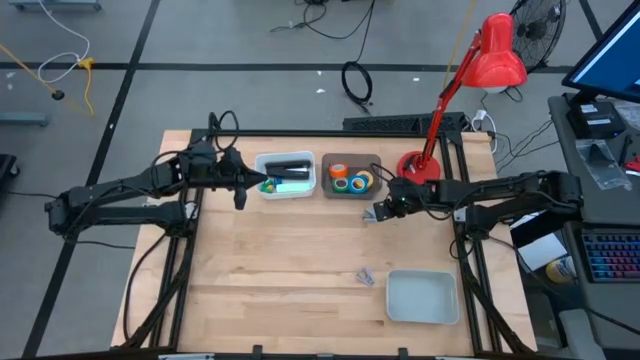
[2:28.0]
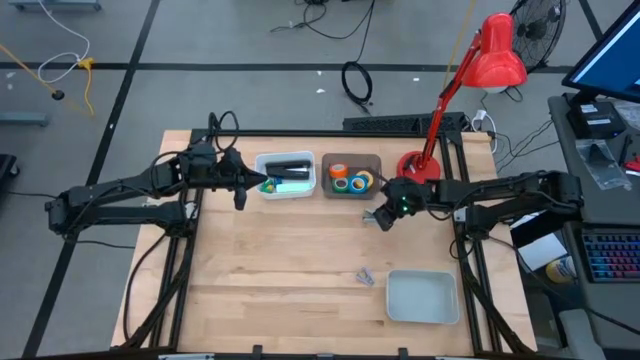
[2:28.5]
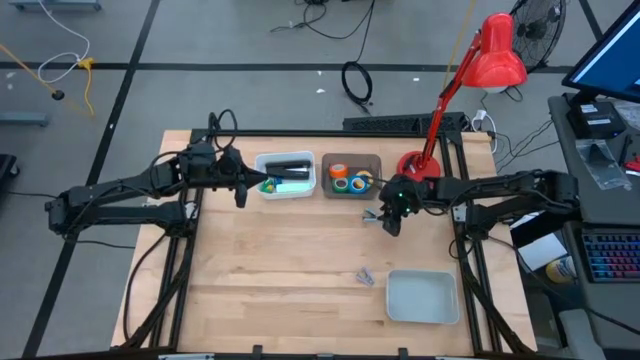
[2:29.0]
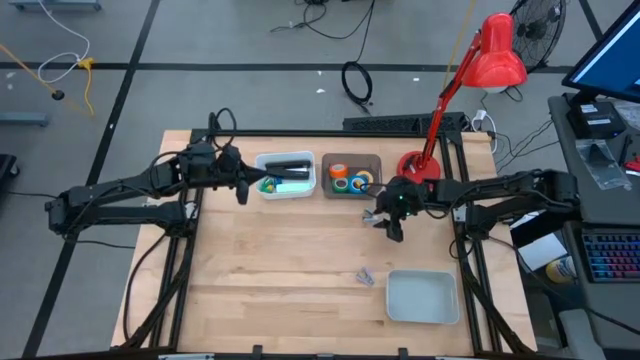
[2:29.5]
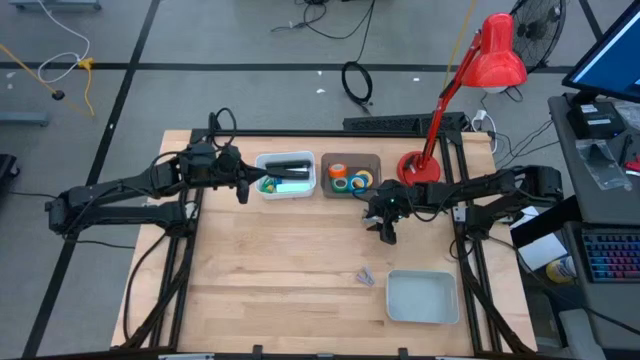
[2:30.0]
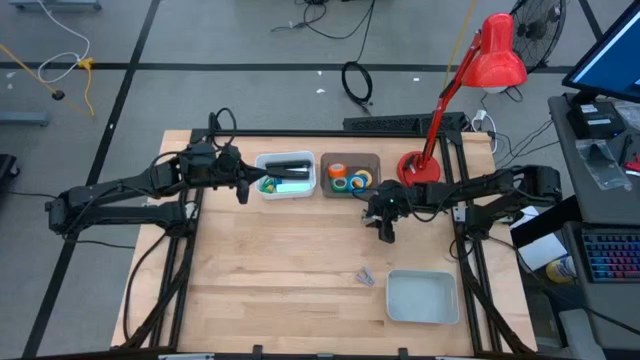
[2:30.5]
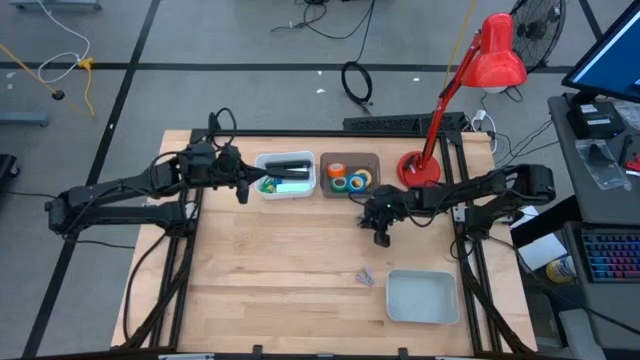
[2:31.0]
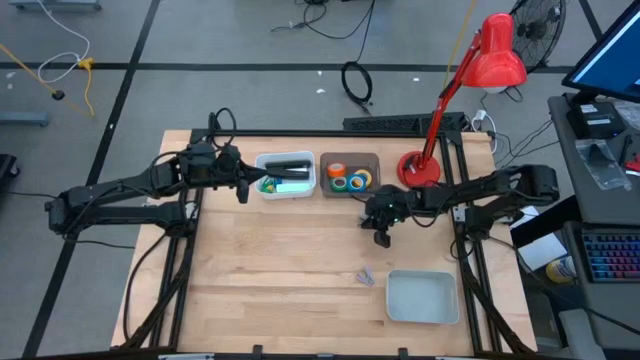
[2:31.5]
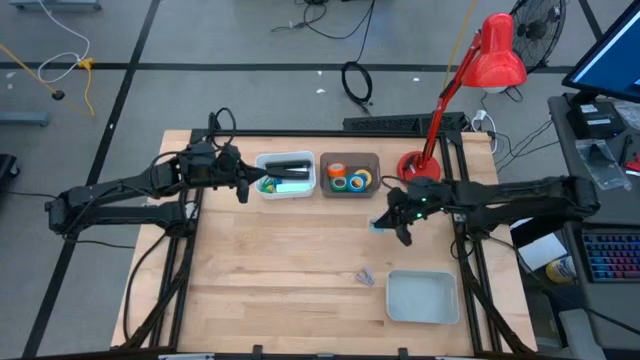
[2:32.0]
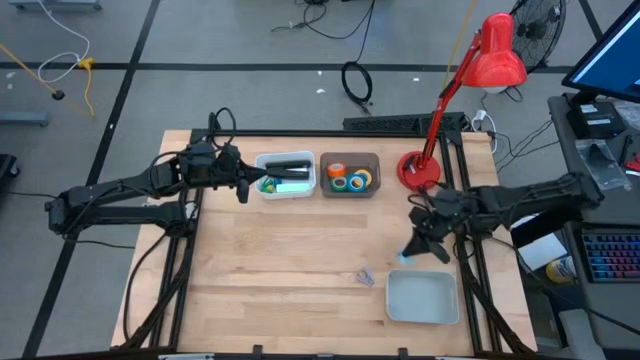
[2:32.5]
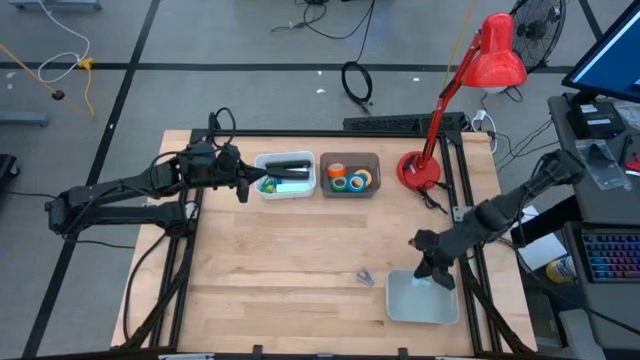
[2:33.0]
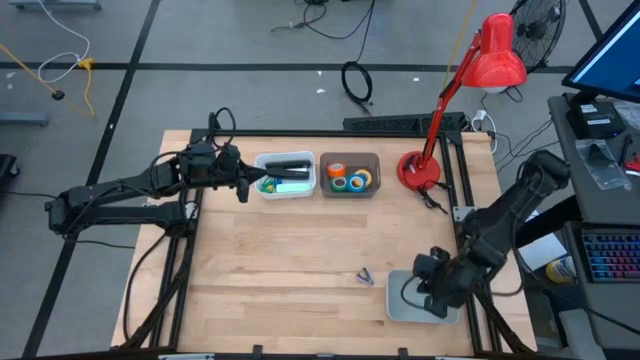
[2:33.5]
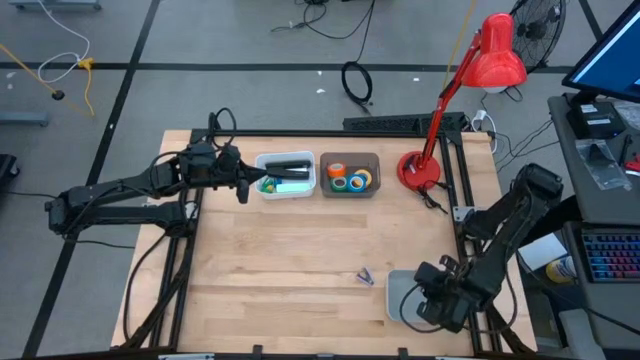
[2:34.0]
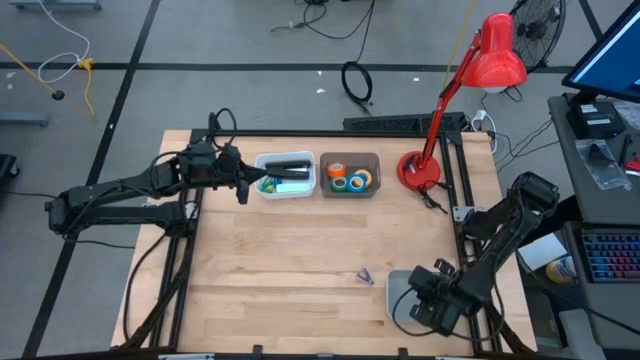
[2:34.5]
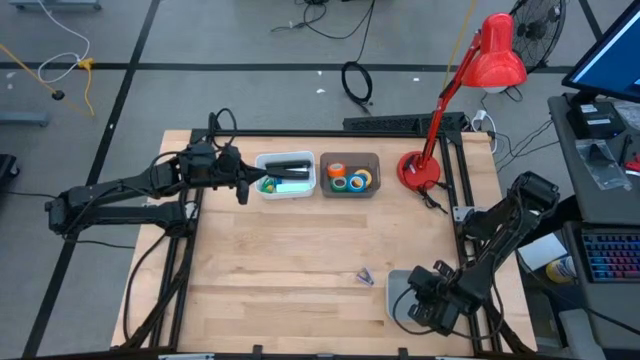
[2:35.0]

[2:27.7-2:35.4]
Task: Pick and place Stapler, Stapler remover, tape
Put the light blue staple remover into the gray bin

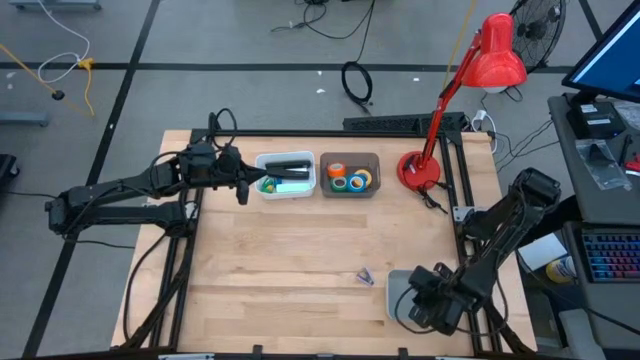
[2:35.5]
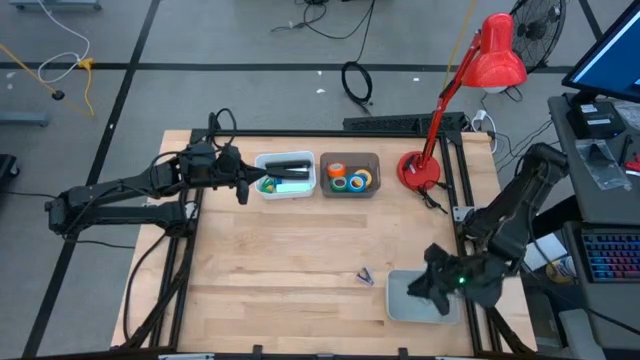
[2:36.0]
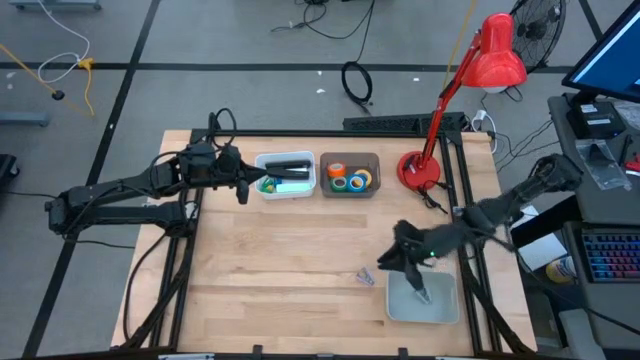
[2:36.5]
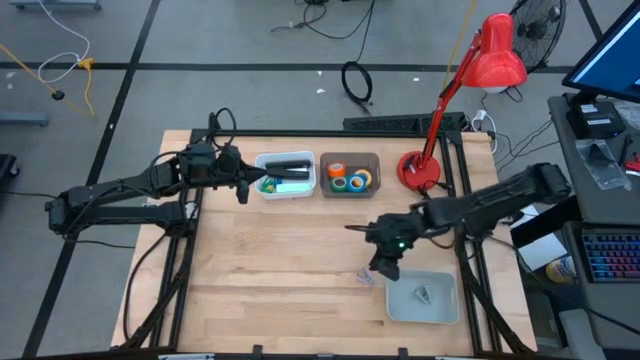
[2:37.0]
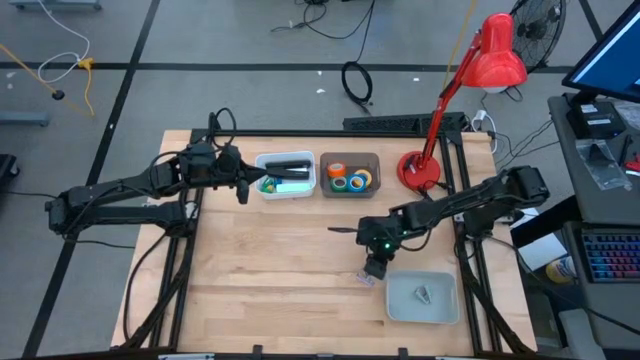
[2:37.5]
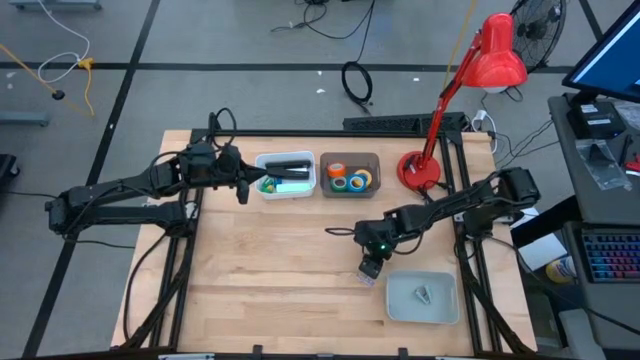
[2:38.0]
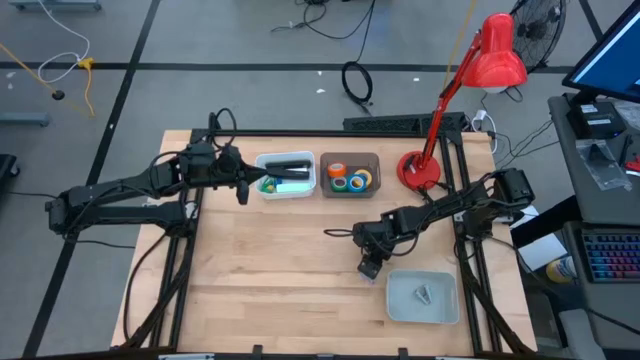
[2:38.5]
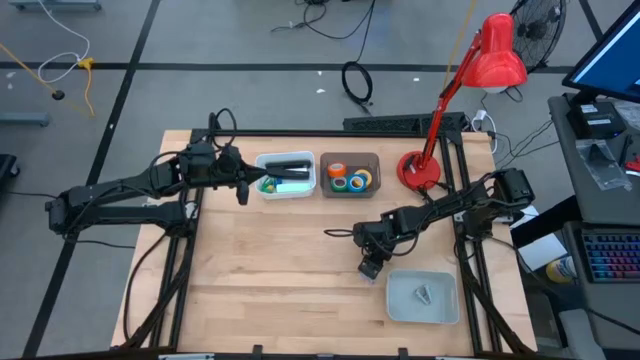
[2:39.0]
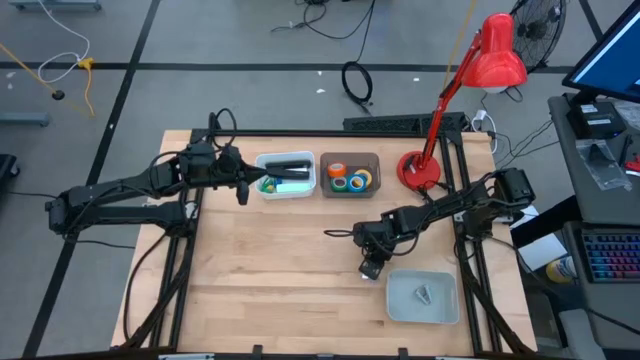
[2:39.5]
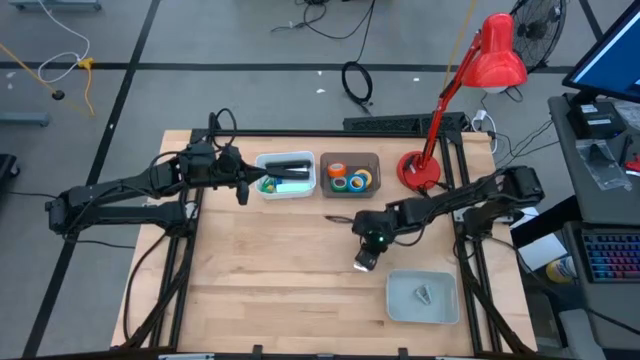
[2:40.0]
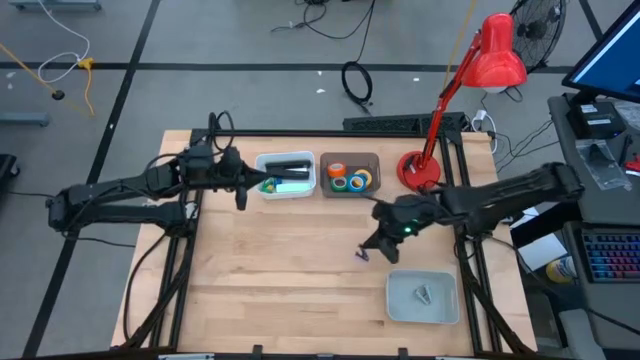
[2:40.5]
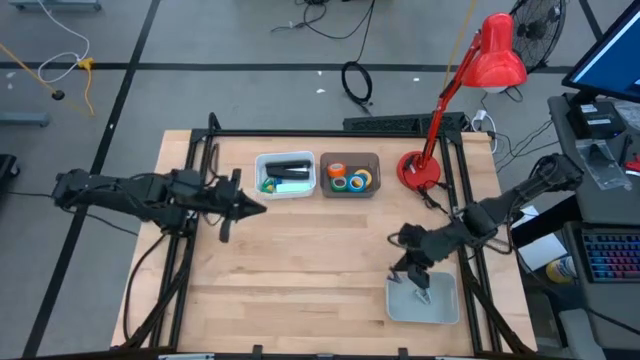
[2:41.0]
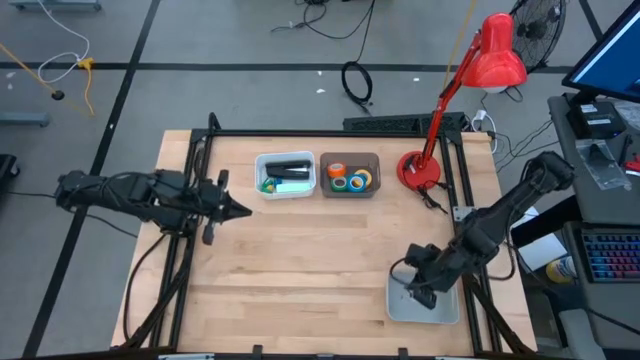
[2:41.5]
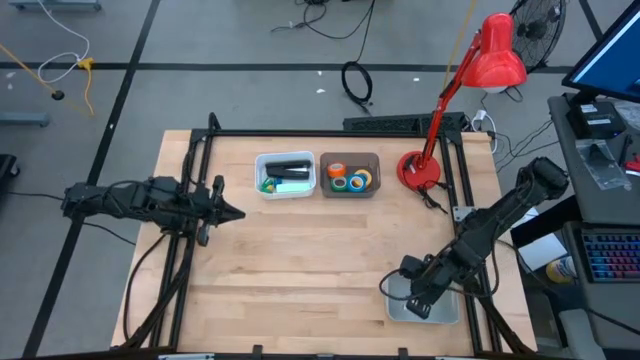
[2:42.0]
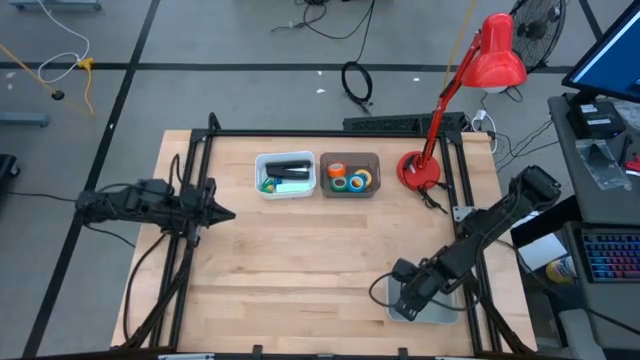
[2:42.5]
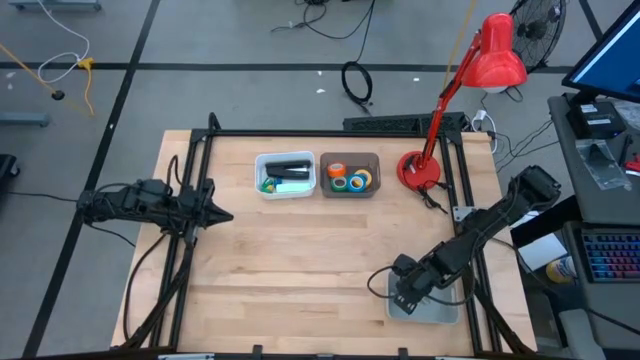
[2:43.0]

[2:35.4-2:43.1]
Put the purple staple remover into the gray bin

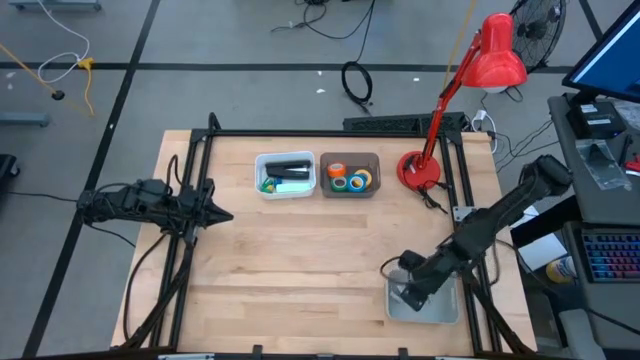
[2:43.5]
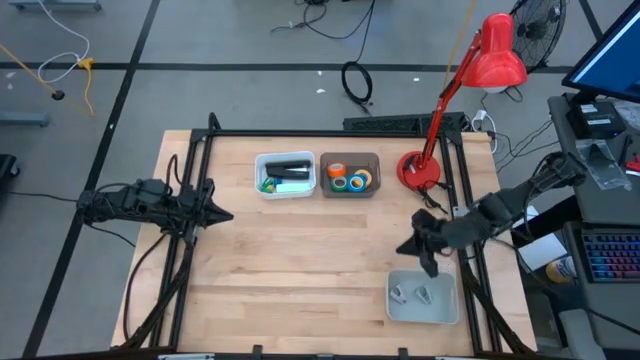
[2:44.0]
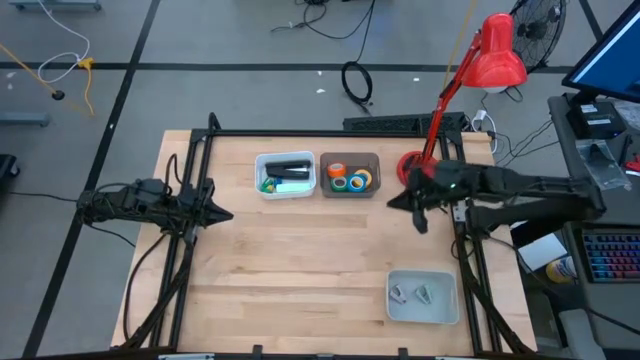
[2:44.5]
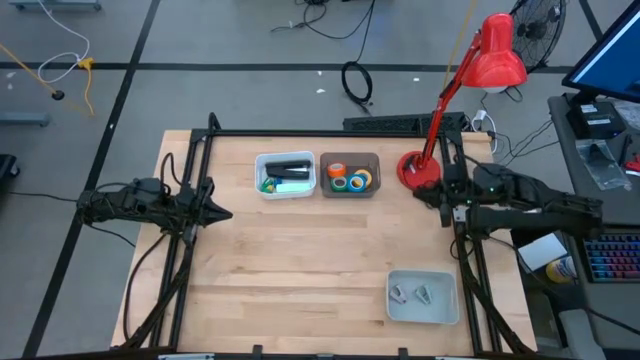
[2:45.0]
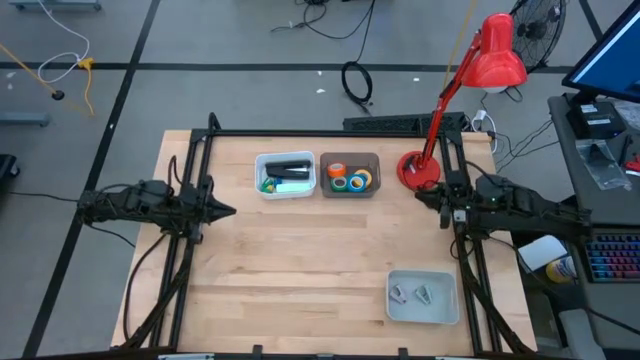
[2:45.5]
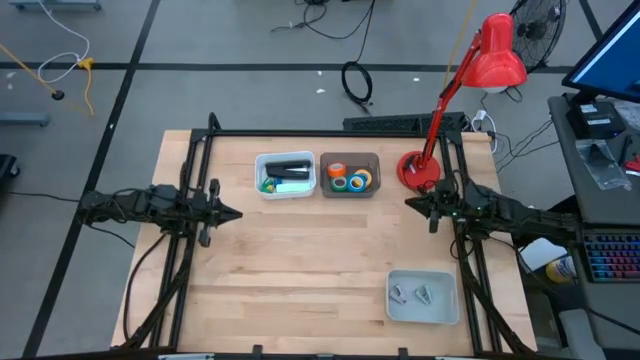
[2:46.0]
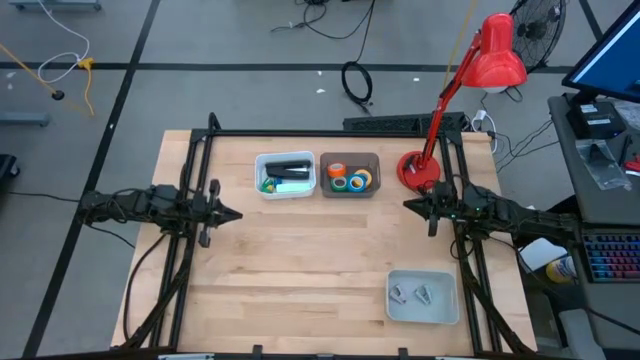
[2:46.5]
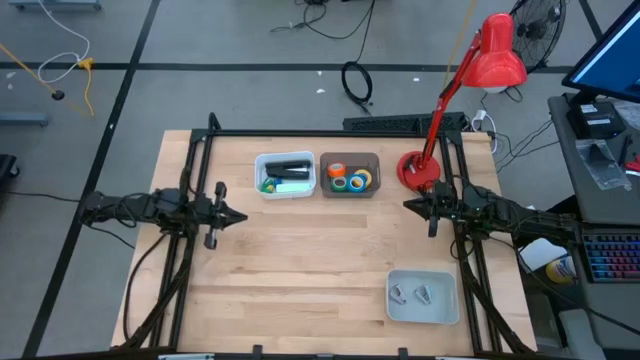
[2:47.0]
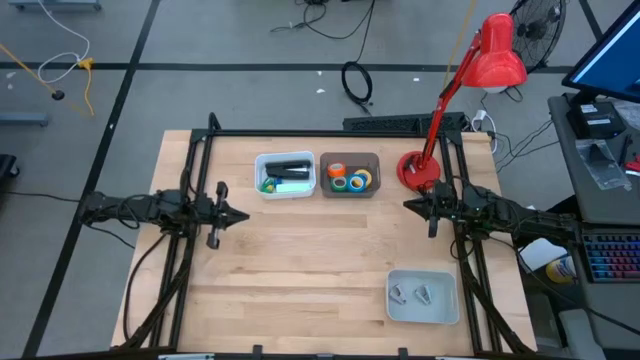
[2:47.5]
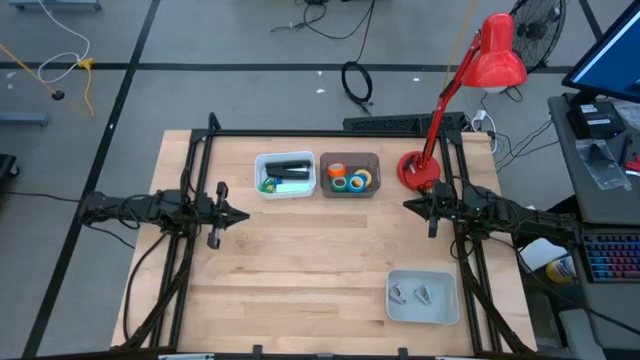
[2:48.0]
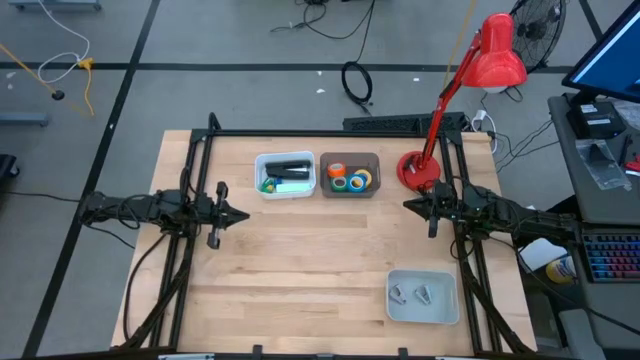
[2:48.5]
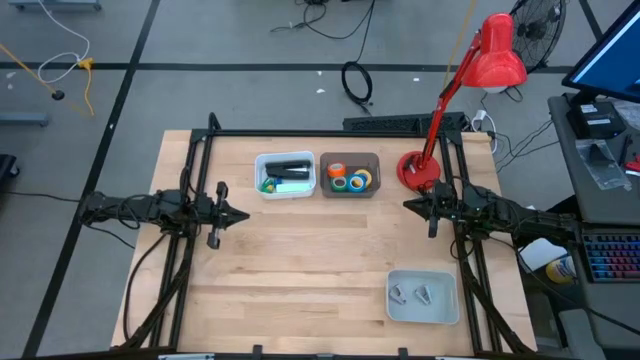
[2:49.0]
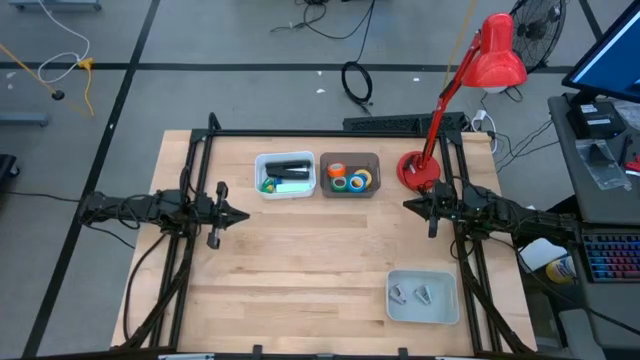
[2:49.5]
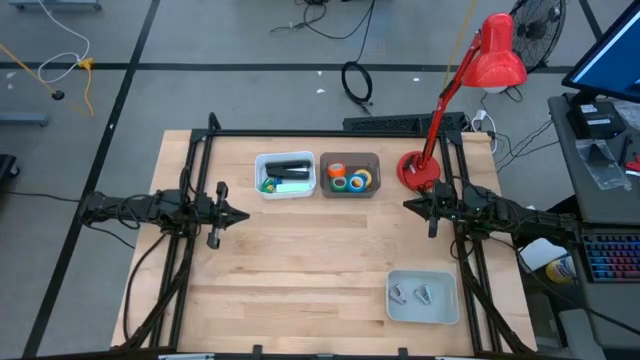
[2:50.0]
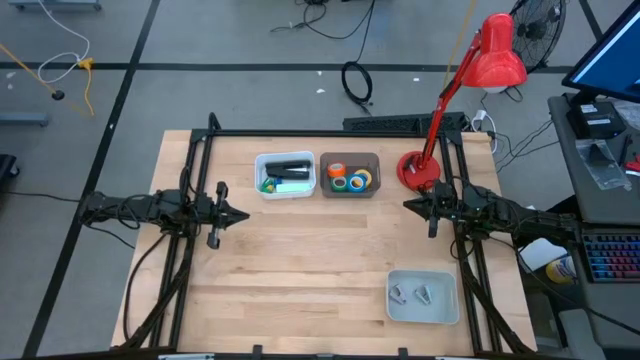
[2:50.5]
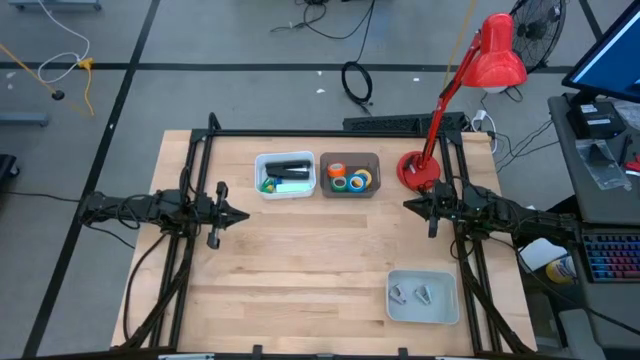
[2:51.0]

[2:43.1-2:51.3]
Return to Home Position
